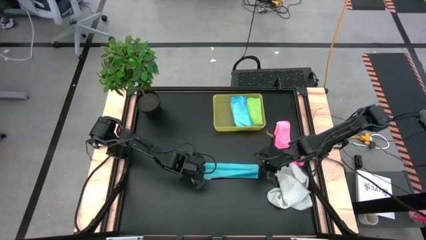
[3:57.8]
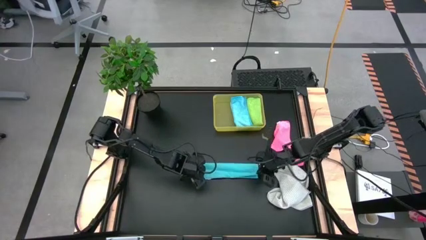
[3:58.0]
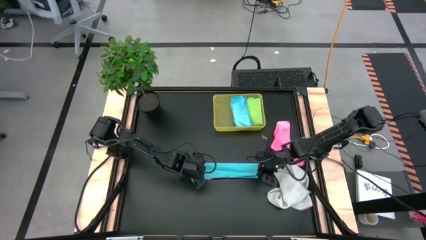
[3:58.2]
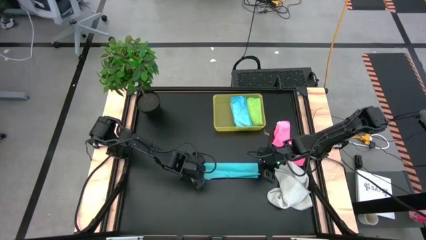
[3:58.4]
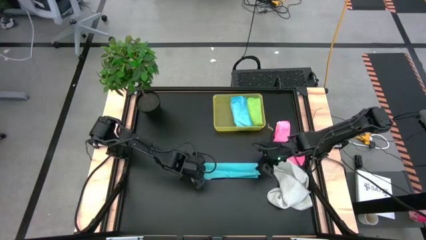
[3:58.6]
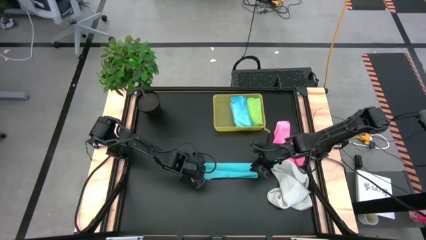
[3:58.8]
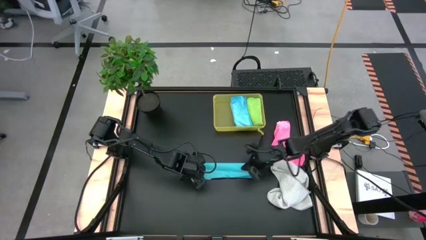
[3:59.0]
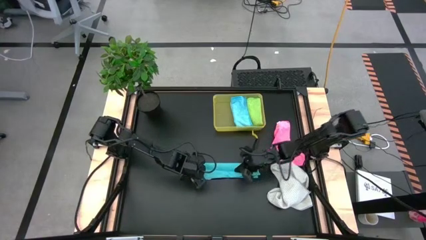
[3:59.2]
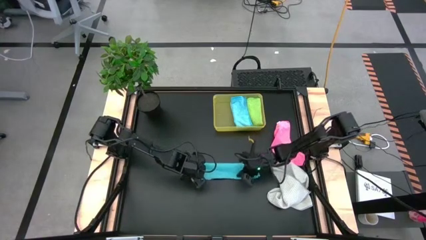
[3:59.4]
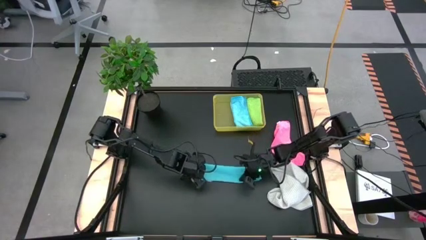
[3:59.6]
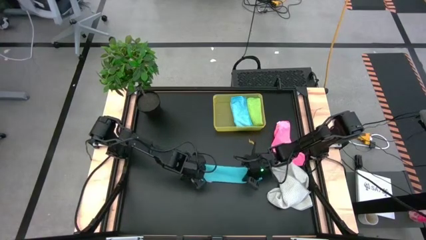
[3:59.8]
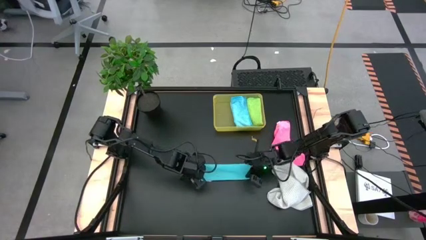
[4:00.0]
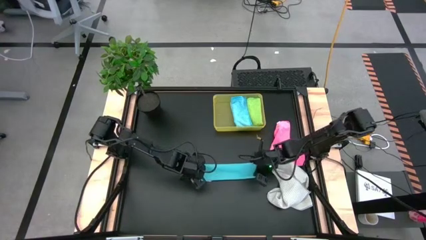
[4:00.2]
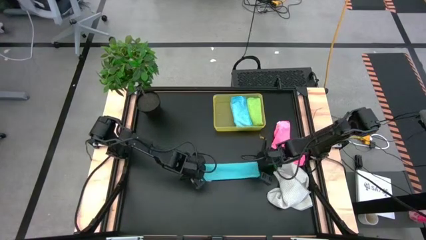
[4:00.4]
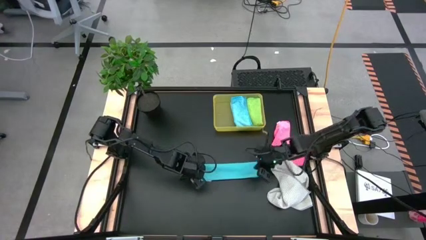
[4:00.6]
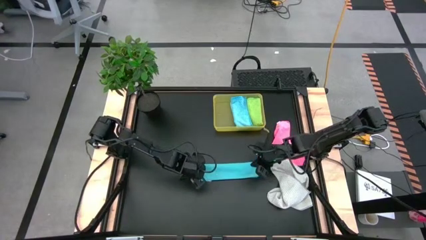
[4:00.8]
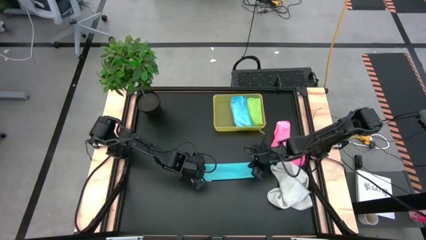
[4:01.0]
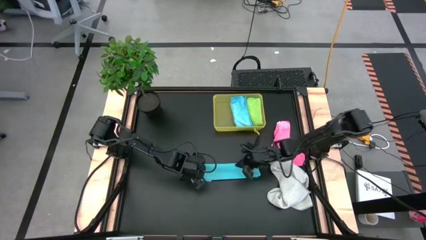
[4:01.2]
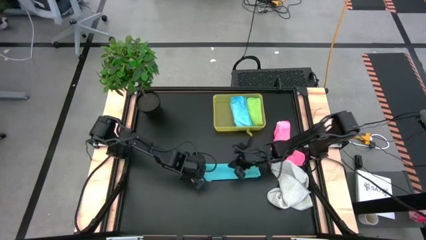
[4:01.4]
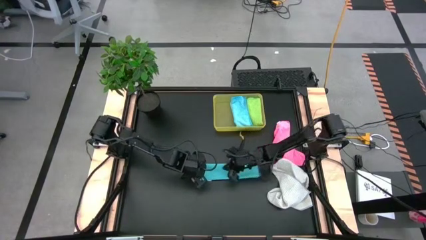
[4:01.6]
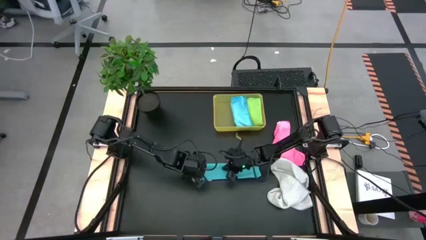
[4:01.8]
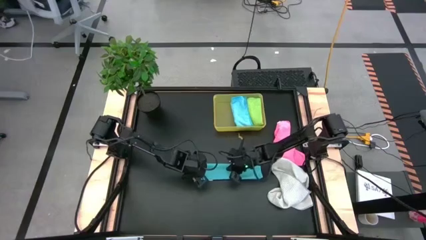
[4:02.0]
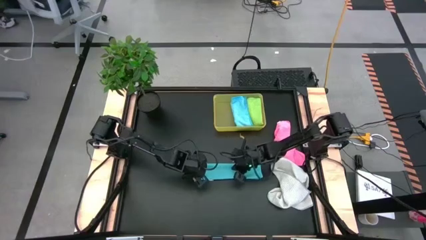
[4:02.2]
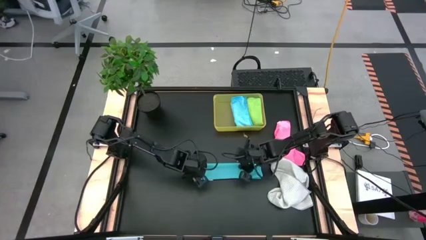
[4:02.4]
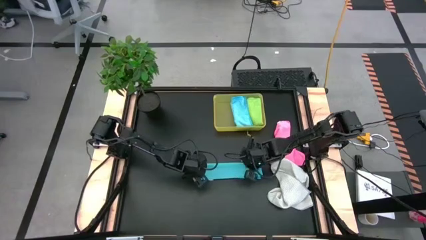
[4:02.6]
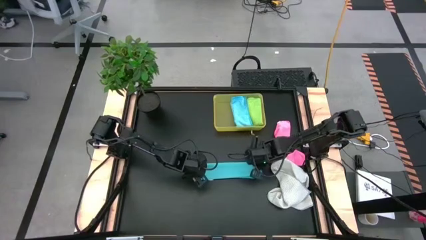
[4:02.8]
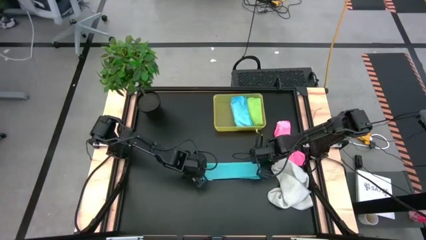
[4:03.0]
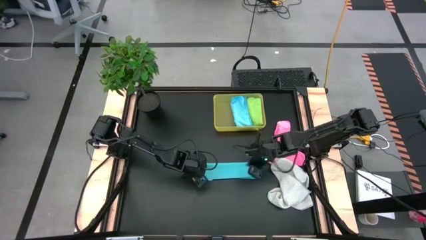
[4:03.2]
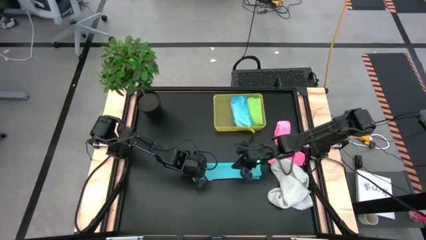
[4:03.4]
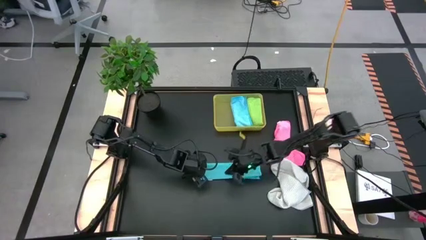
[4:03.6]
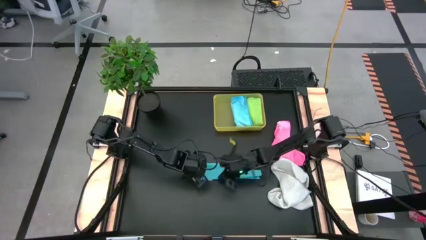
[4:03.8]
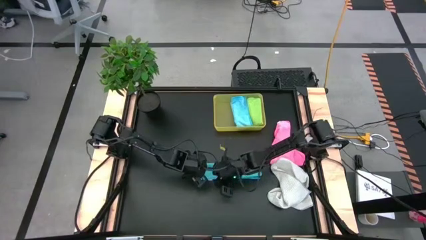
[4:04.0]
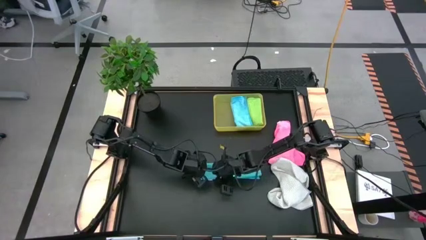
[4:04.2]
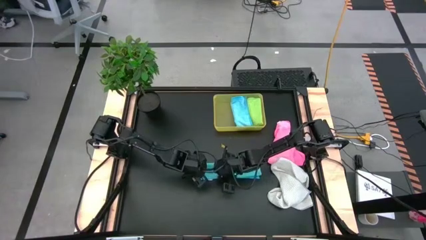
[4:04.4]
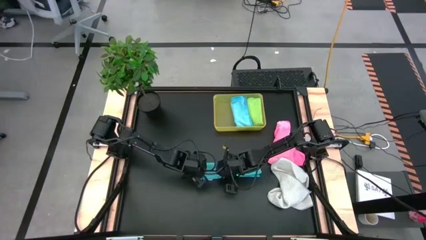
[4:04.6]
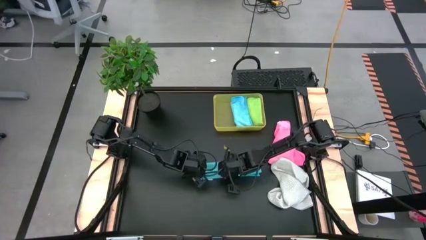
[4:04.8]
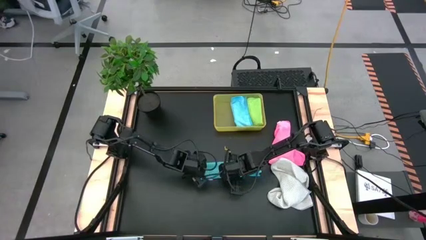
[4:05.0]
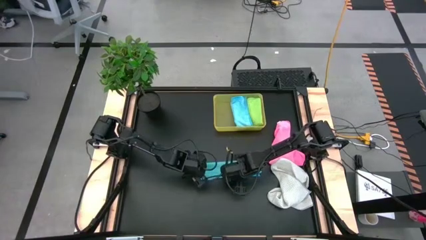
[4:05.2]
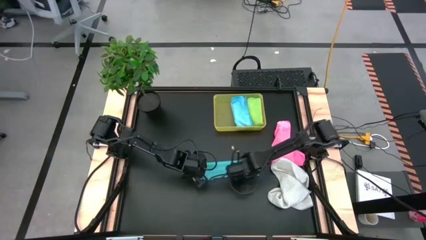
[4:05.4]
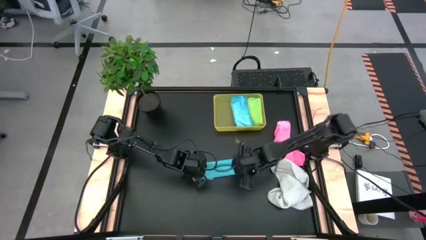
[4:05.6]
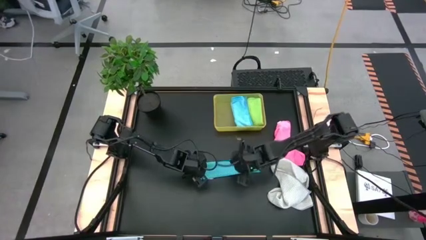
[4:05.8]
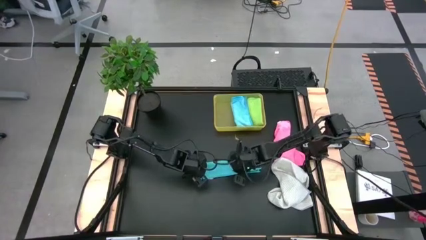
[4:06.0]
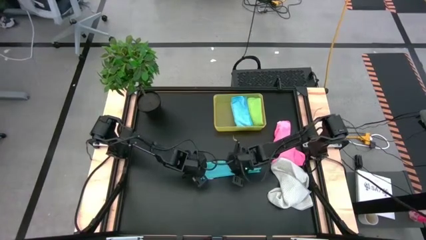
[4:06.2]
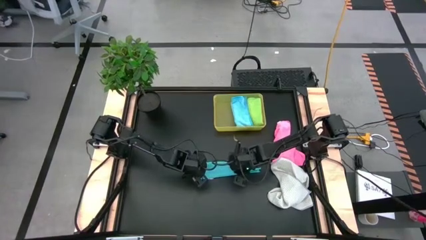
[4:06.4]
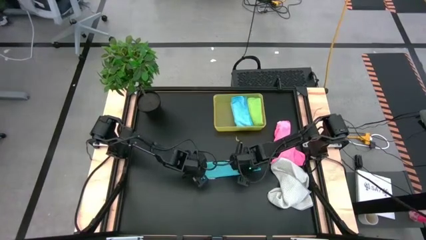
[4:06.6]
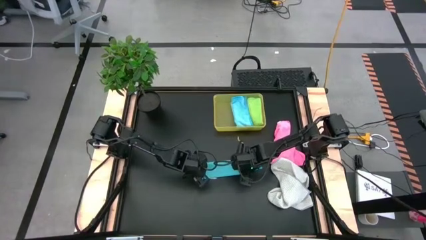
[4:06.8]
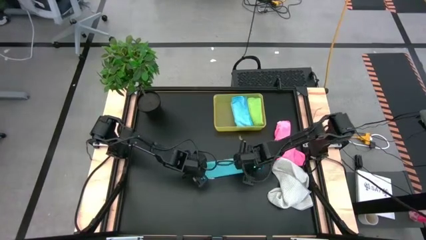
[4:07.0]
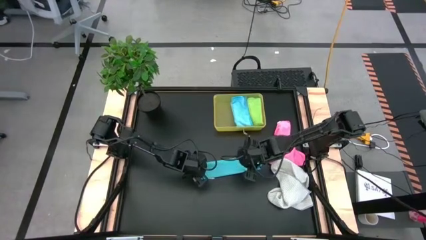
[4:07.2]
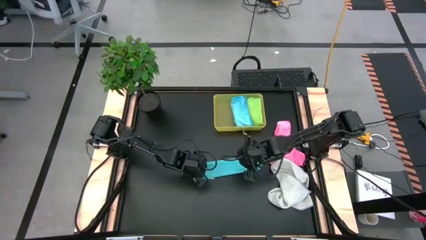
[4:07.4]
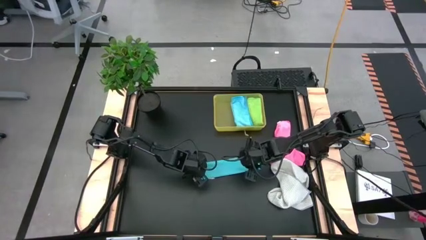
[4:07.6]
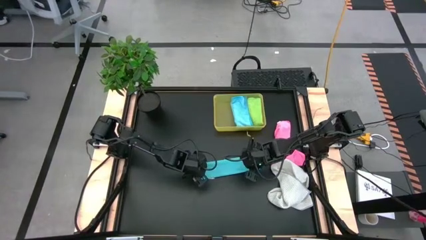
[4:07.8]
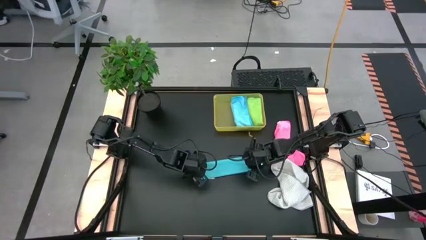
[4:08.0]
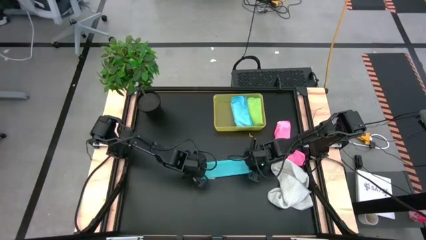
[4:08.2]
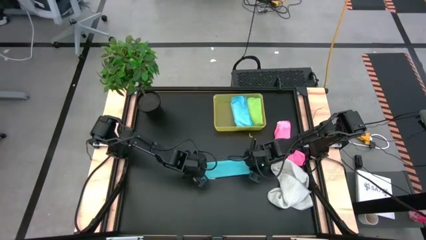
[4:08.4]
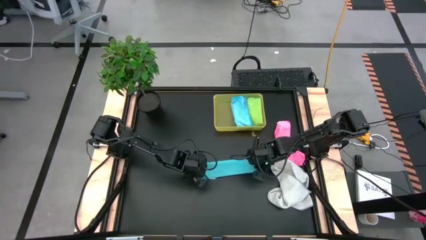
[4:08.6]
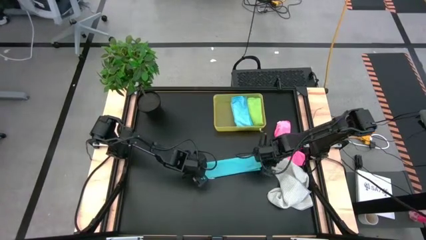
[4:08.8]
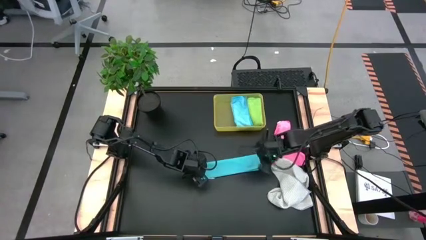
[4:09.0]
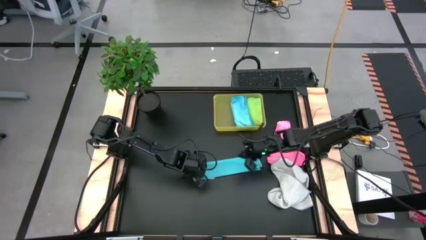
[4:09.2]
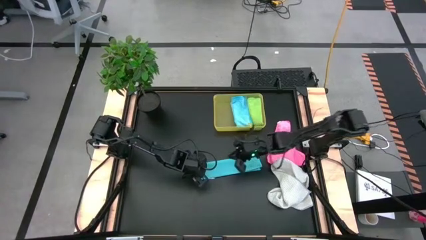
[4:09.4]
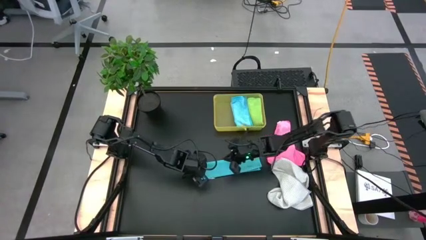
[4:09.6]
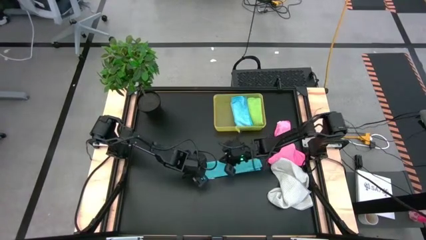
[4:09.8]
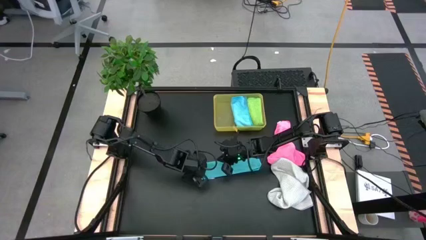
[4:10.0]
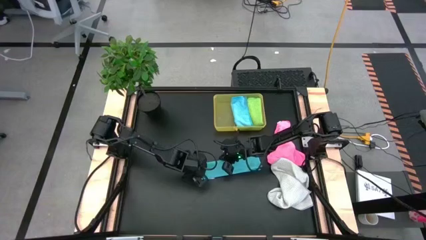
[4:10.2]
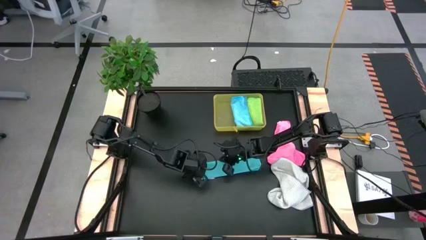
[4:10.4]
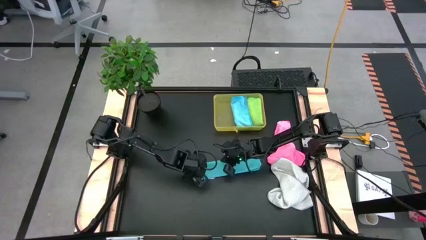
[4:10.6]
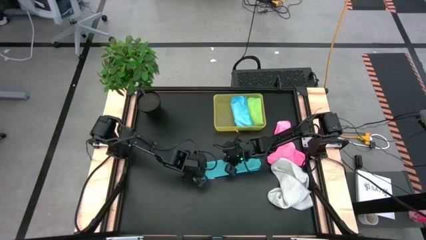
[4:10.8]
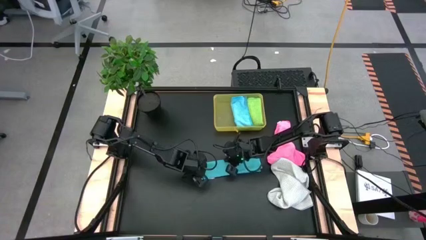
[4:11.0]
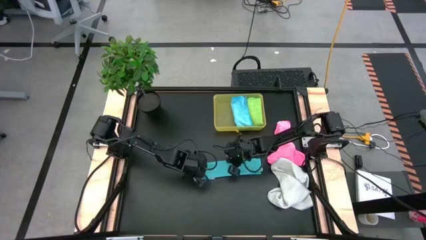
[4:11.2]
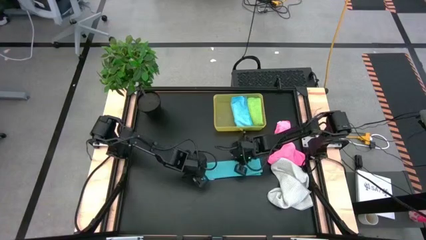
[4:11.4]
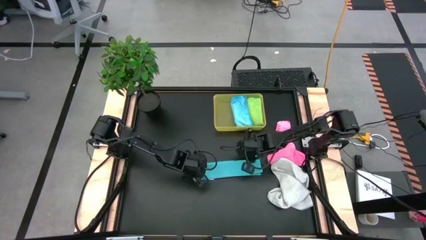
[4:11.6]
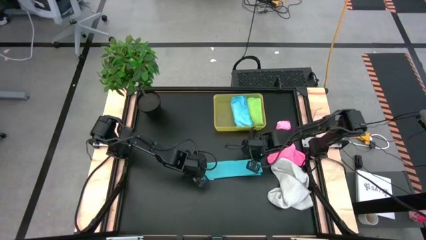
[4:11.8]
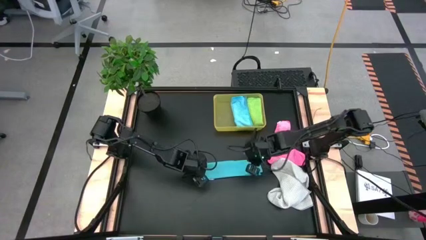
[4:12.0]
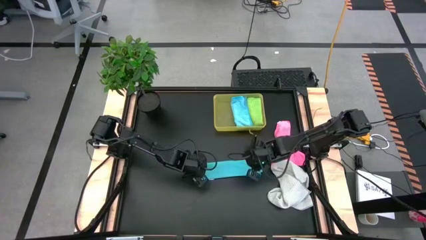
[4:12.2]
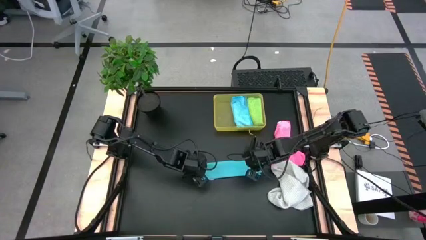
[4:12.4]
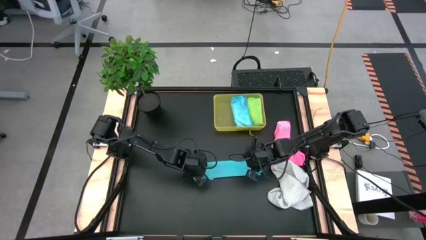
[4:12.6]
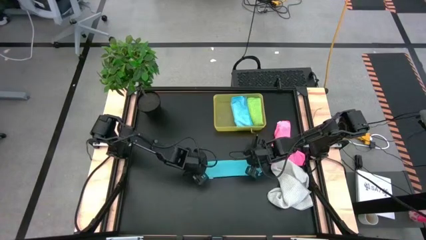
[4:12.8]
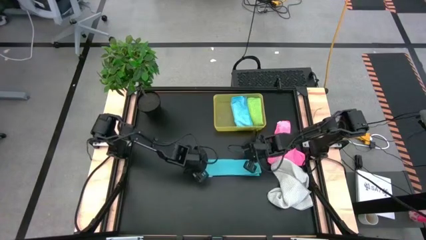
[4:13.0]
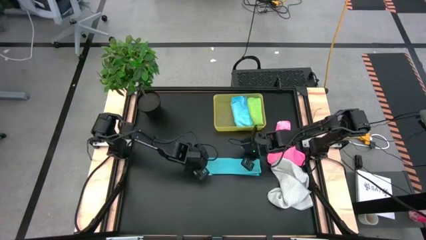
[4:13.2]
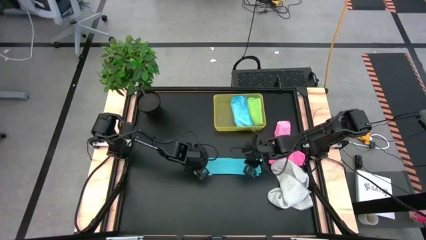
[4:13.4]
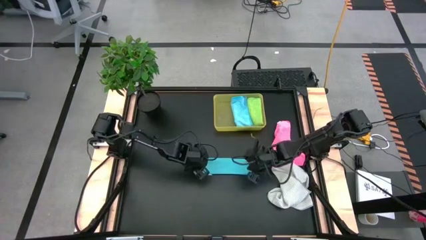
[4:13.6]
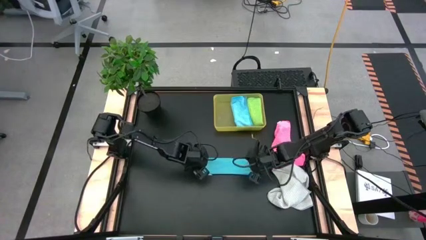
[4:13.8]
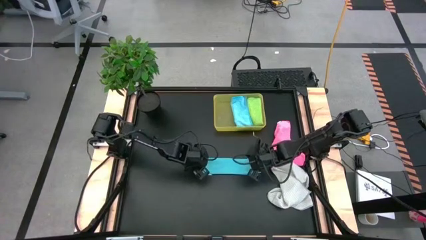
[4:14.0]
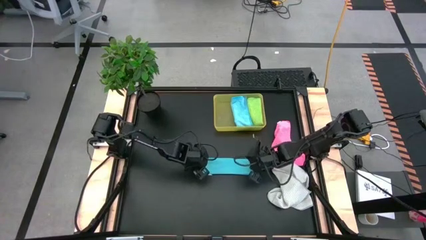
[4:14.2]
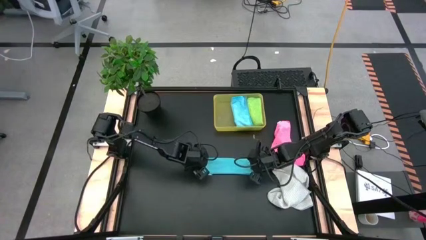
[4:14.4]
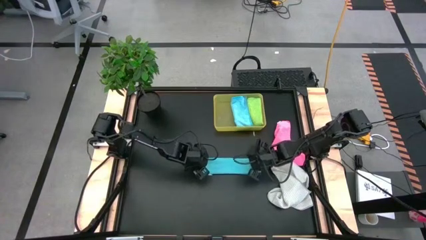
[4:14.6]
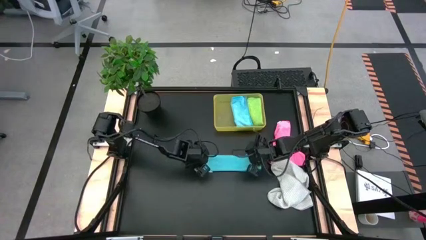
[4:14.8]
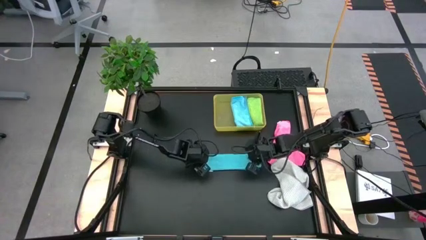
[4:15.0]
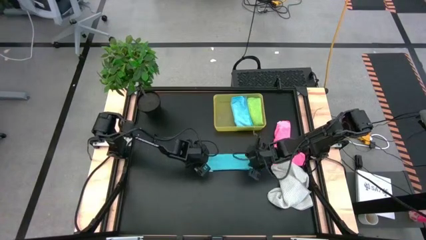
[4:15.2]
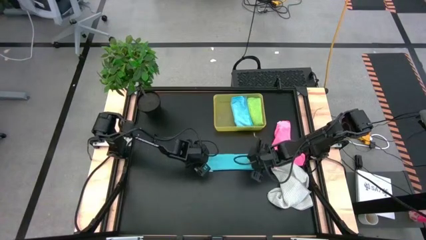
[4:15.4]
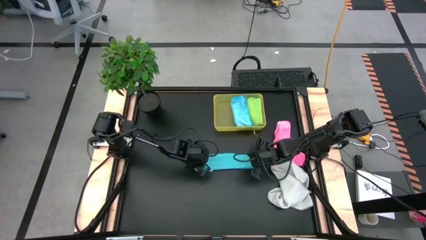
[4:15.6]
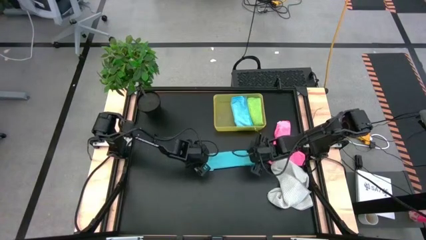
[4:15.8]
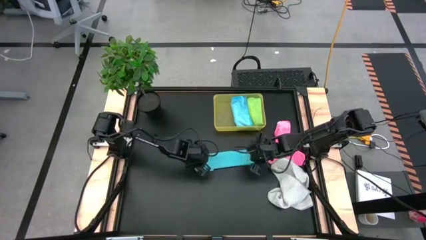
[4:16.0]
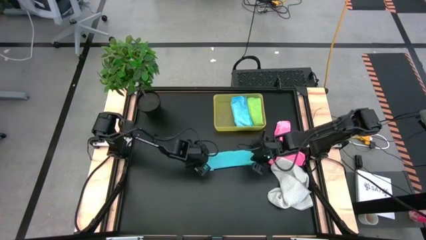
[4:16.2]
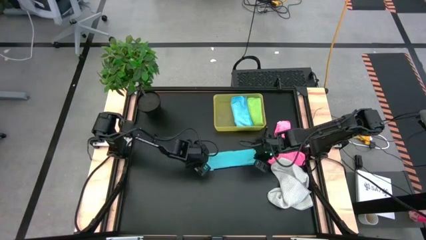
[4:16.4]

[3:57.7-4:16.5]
Task: Fold microfiber towels
Fold the blue microfiber cloth
